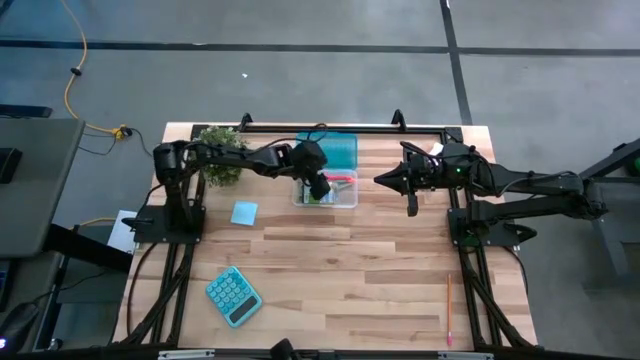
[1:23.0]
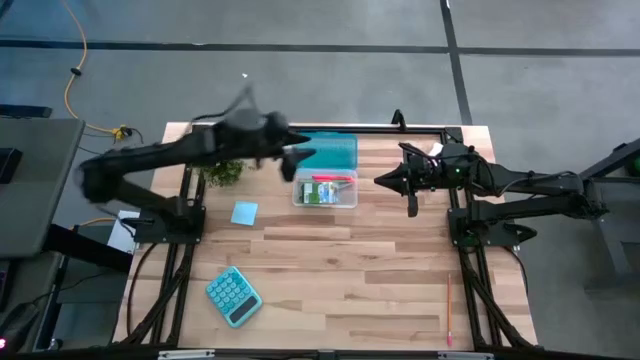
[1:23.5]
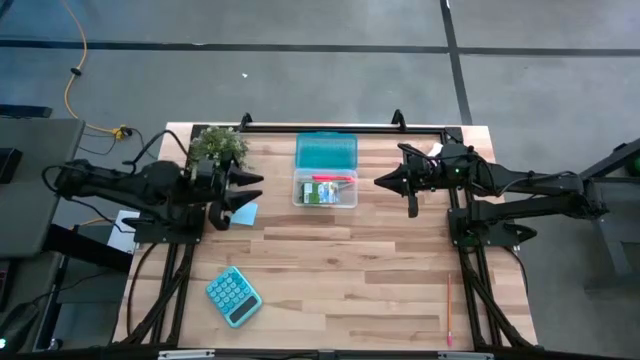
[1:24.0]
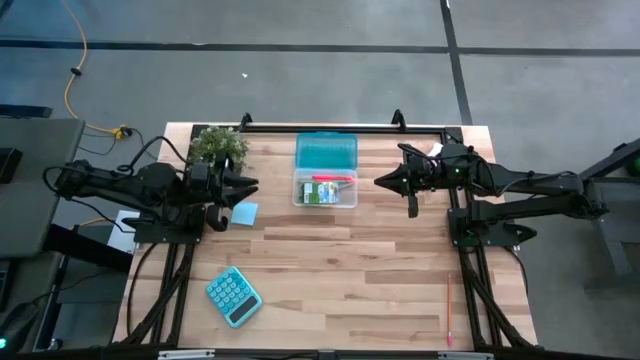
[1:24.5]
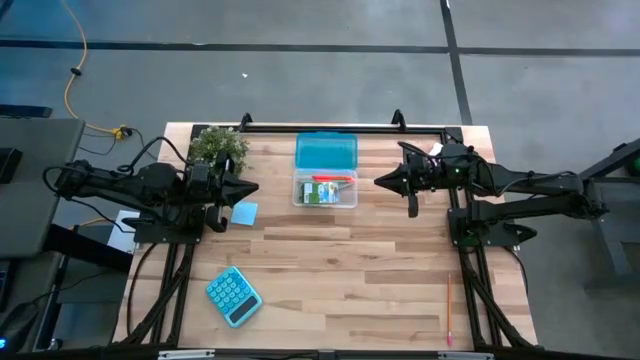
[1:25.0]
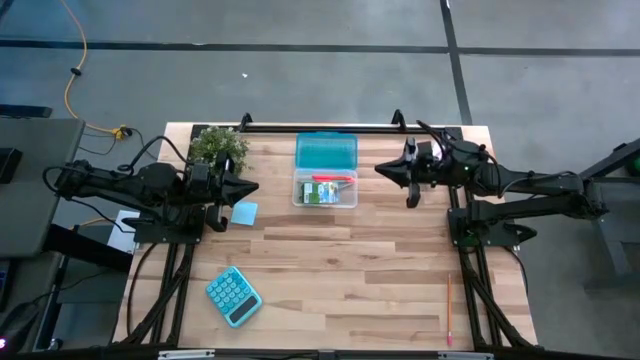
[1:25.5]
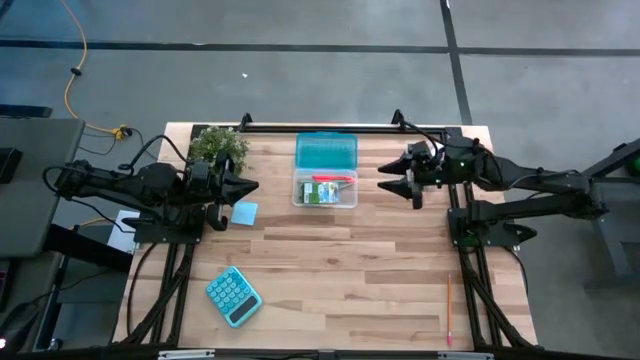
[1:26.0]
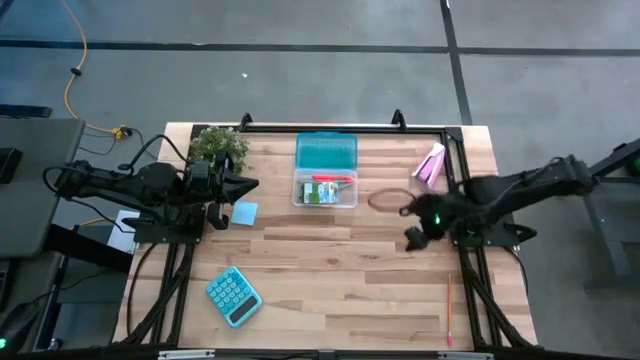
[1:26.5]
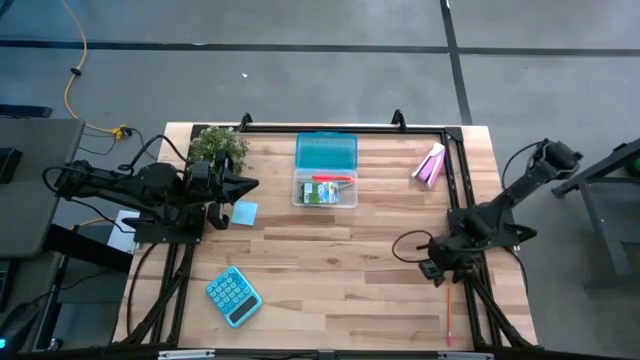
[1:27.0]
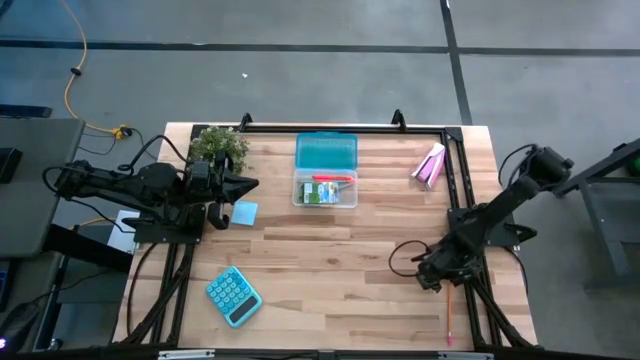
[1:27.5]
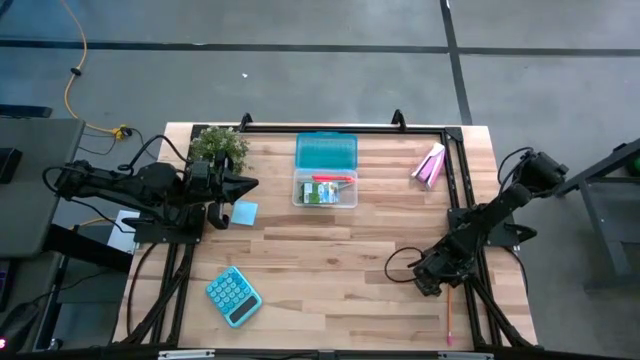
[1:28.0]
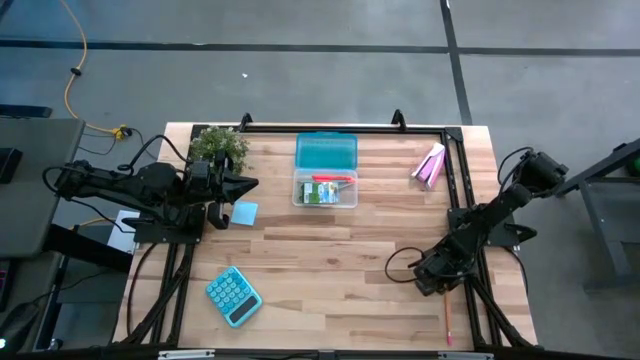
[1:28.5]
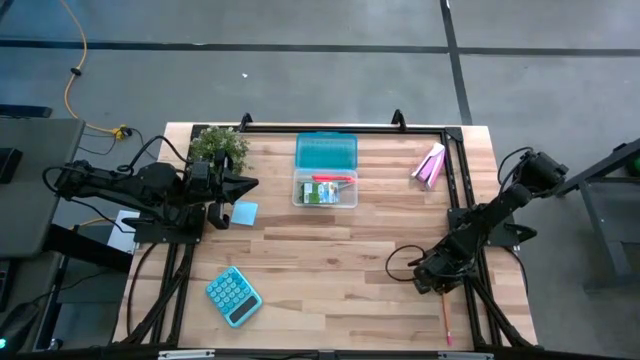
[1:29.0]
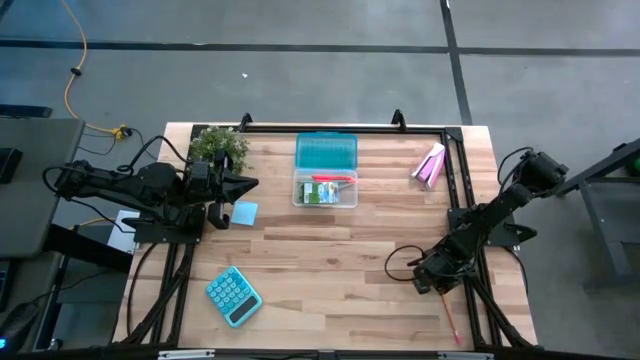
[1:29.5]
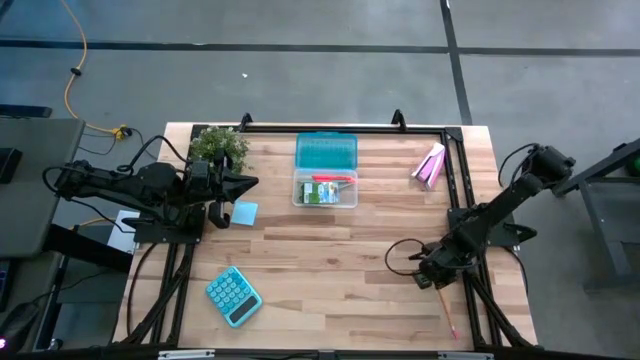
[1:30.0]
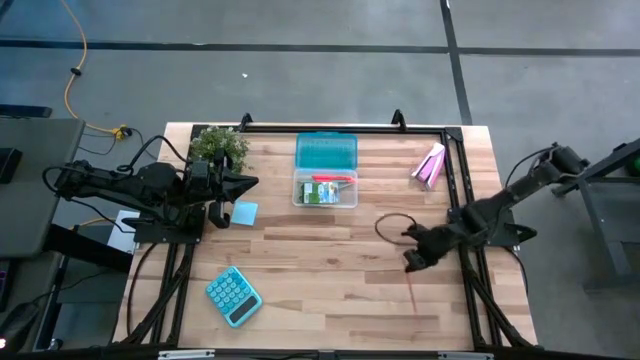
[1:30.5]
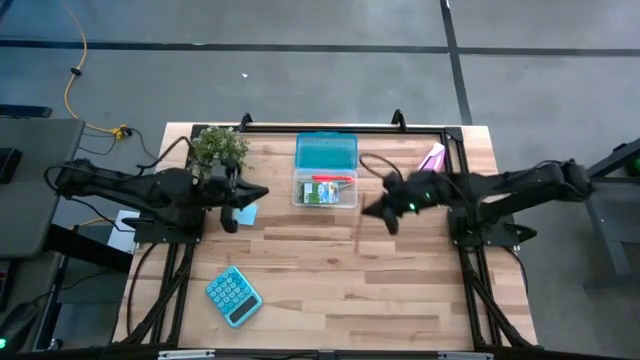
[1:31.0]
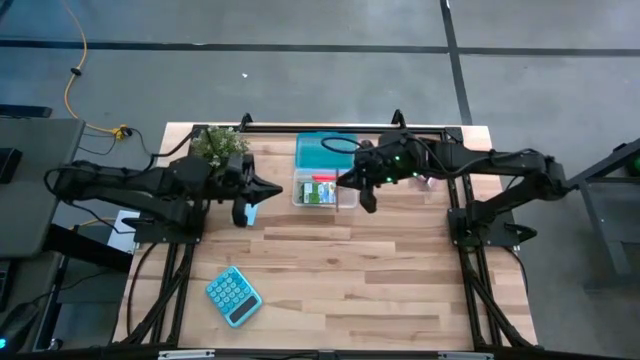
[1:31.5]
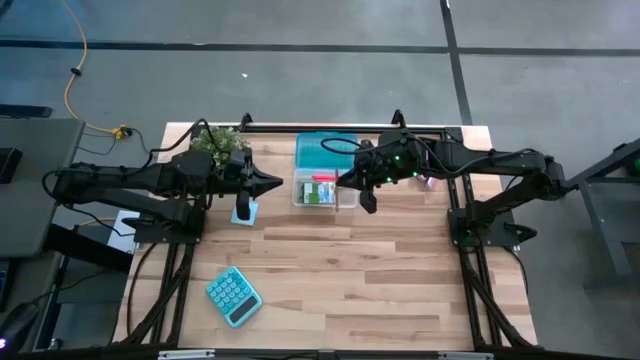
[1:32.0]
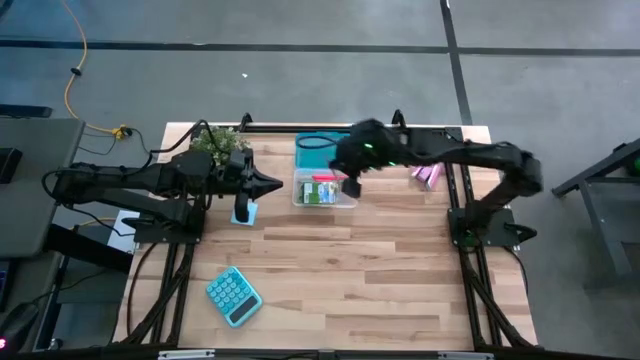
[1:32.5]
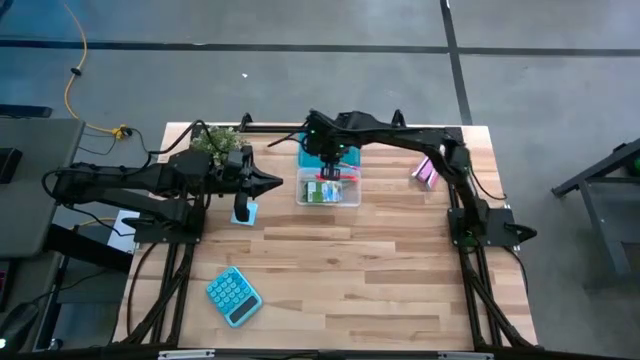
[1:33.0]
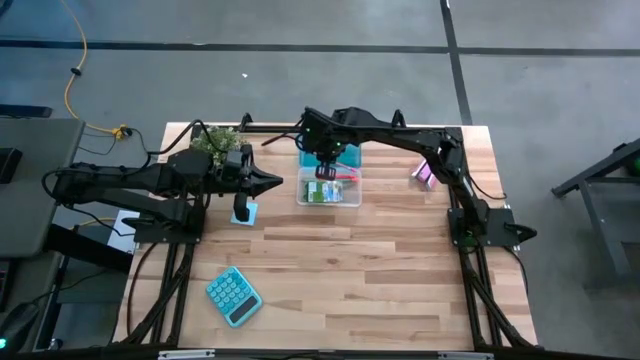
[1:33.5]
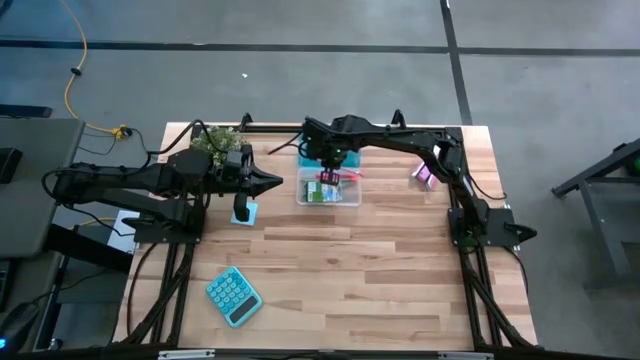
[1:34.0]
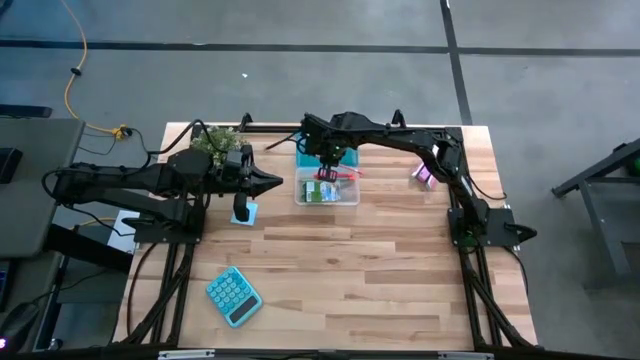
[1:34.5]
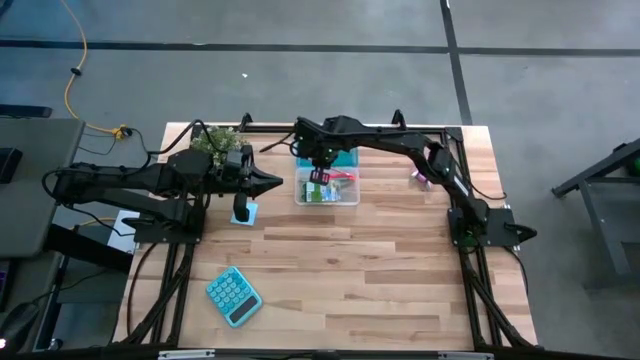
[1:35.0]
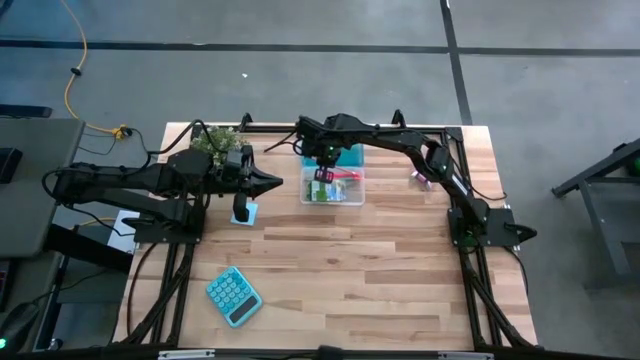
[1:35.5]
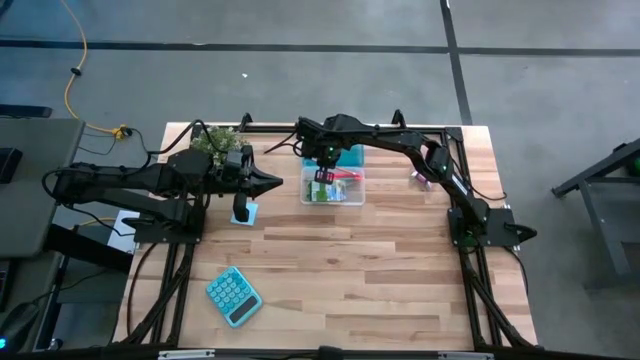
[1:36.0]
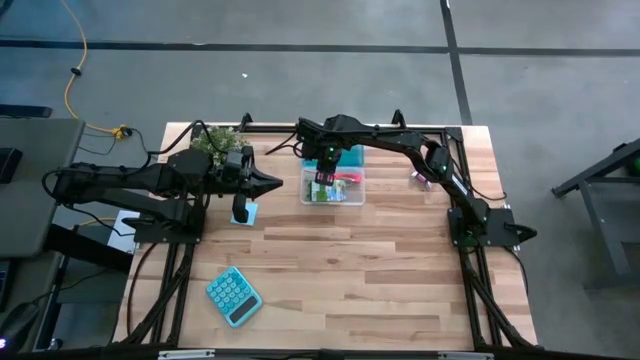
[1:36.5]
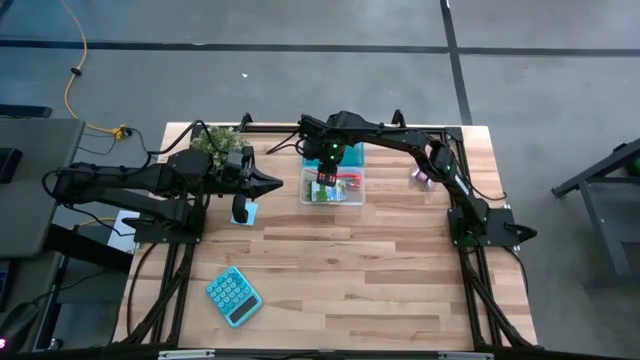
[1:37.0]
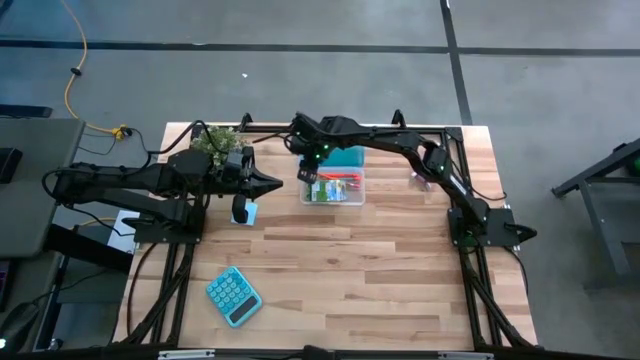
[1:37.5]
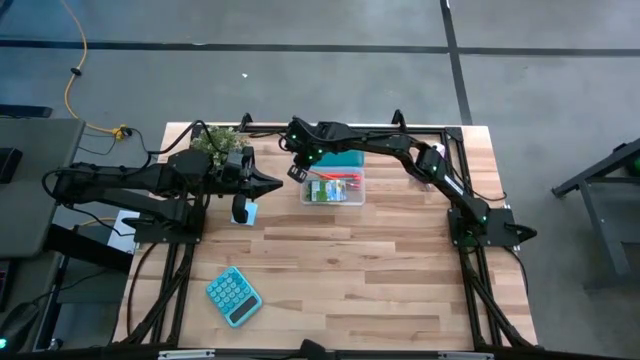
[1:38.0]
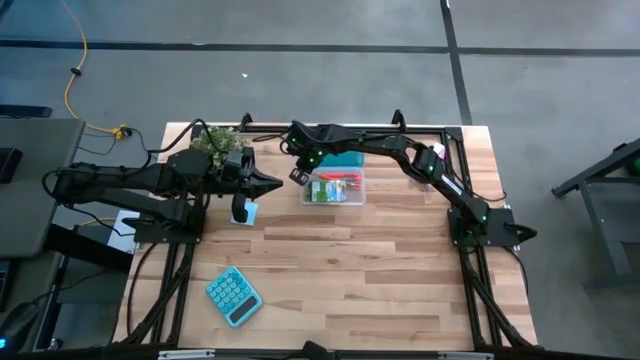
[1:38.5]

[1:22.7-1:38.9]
Task: Pack school essentials
Put the orange pencil into the supply box

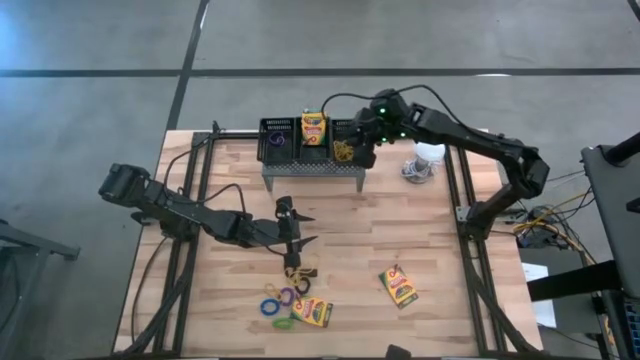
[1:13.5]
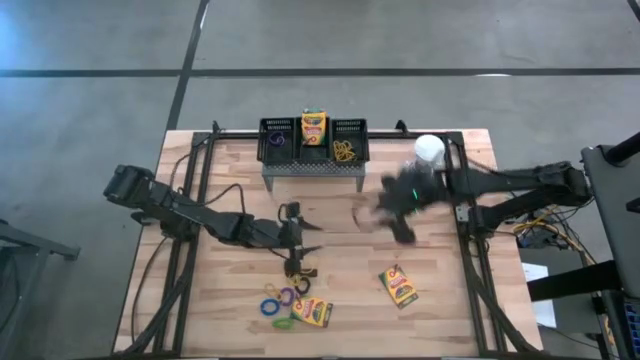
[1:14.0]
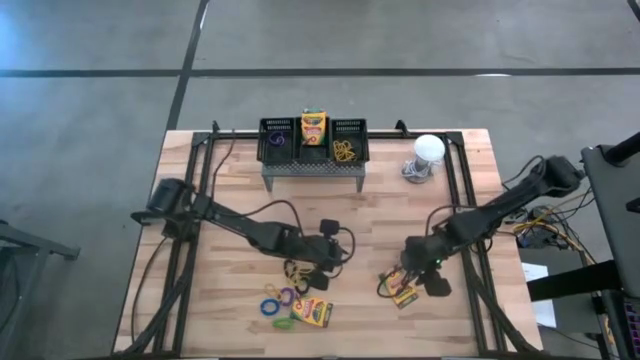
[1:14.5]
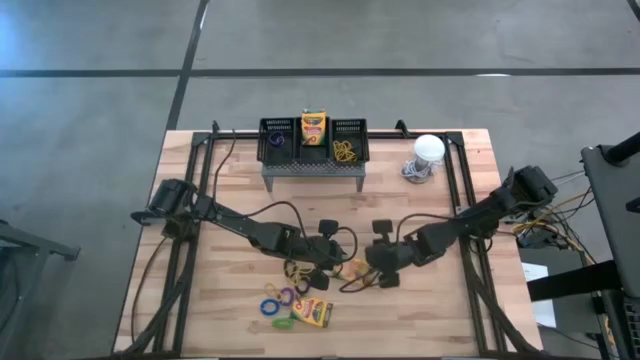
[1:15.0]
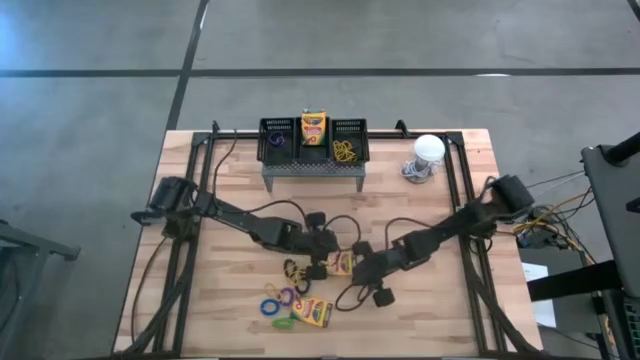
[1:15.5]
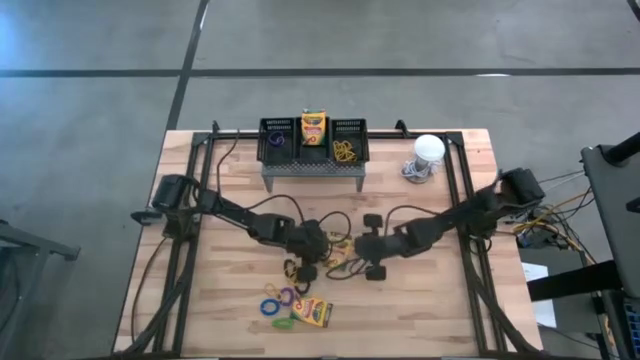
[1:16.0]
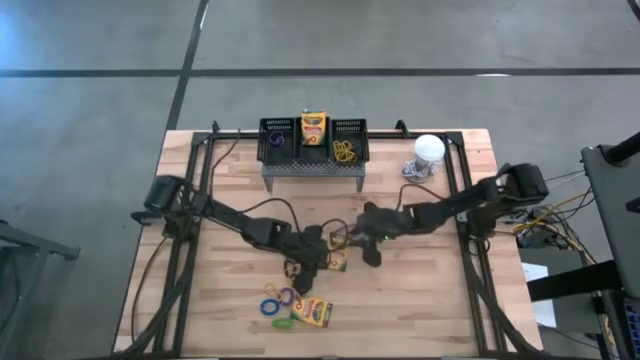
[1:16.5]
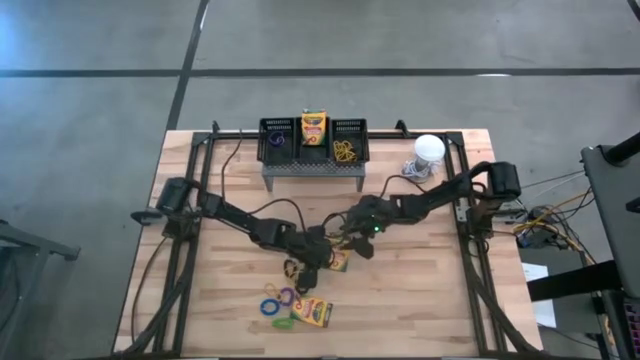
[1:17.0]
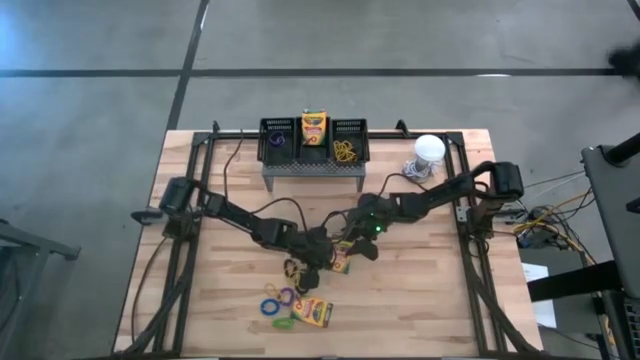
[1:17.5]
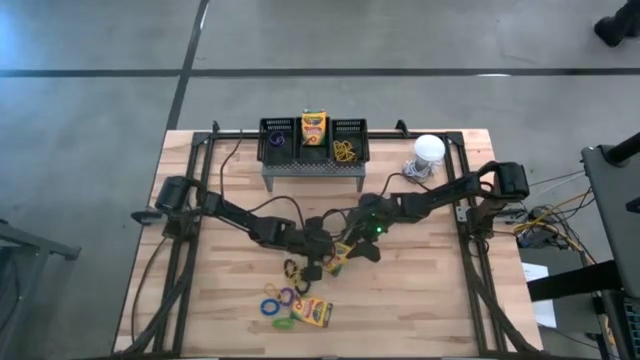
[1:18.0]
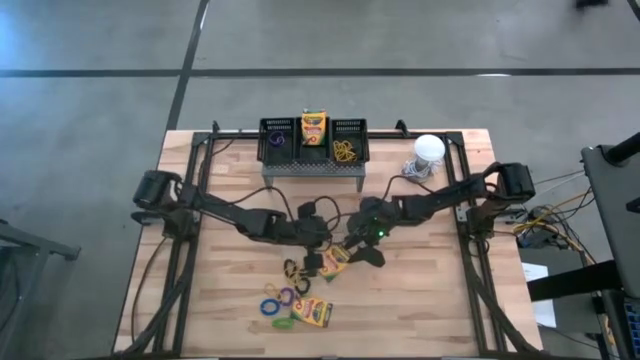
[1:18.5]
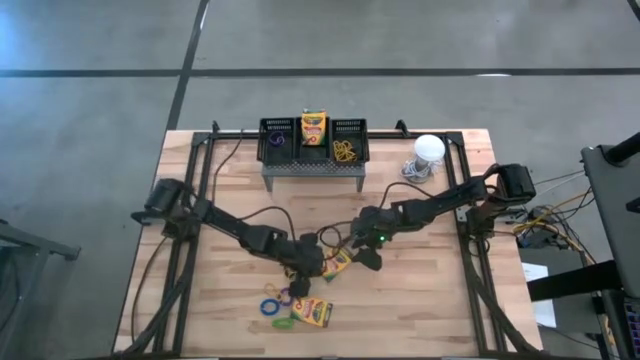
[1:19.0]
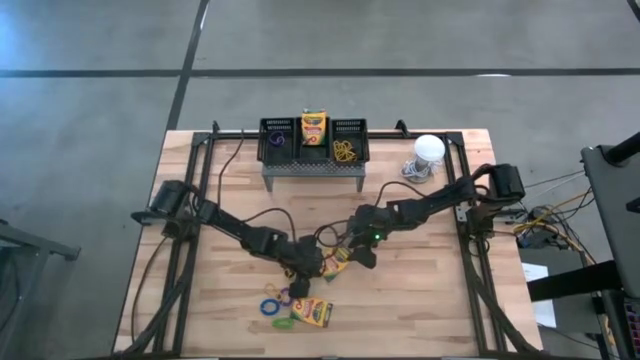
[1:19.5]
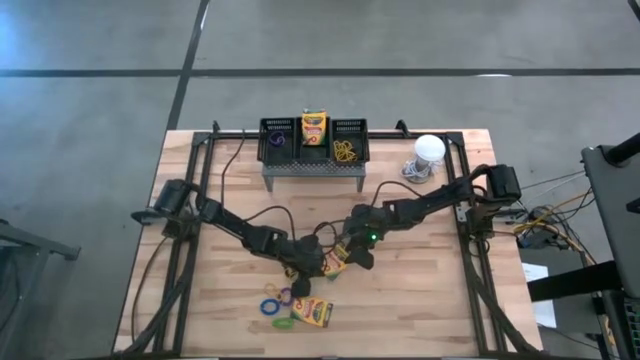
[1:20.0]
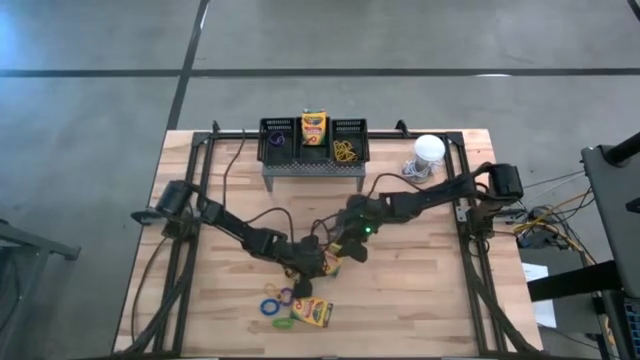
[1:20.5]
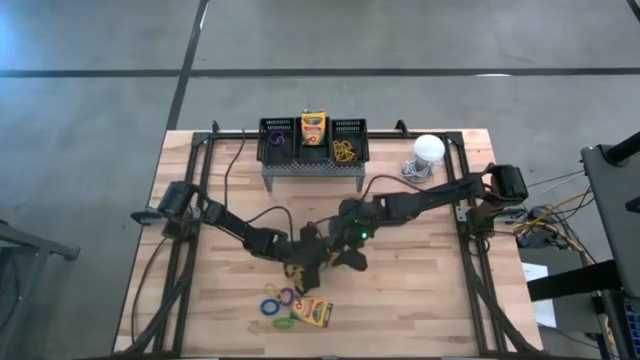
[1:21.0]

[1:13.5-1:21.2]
Task: Pick & Place Office Desk Supplies
Put the yellow crayon box into the middle black basket on the shelf
